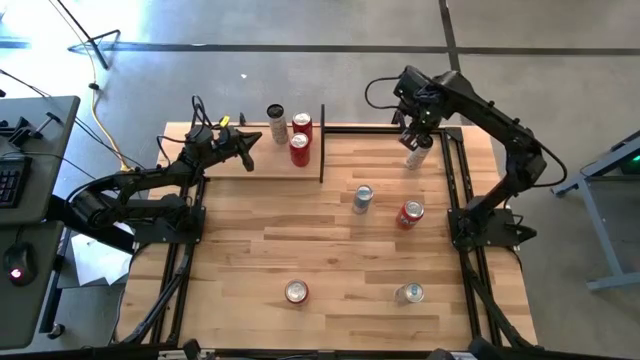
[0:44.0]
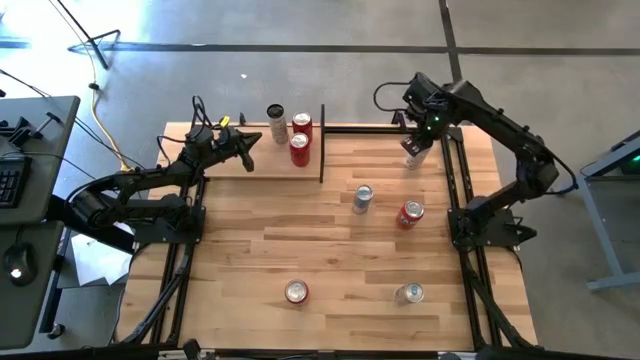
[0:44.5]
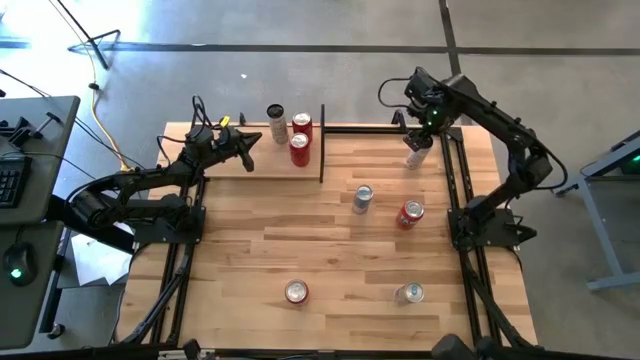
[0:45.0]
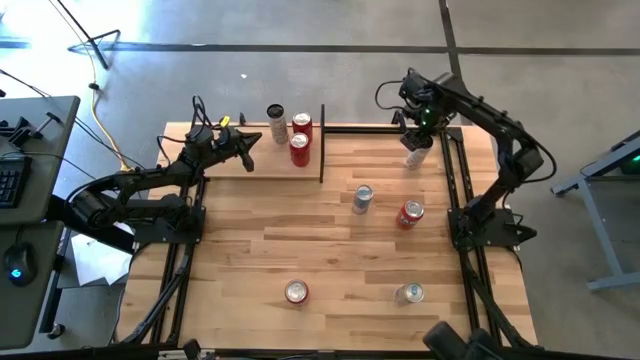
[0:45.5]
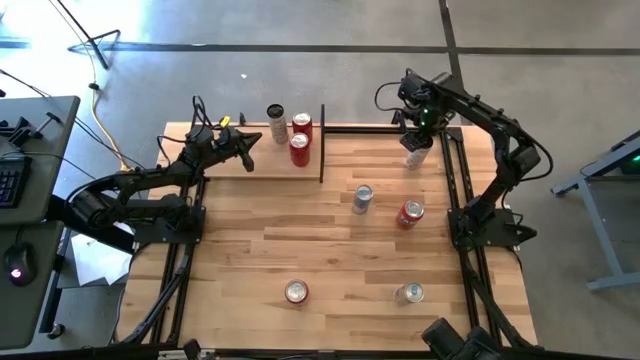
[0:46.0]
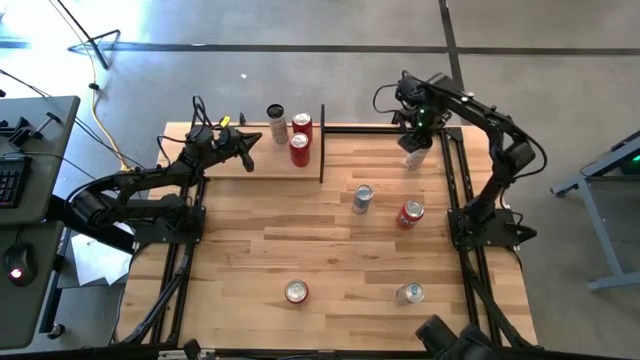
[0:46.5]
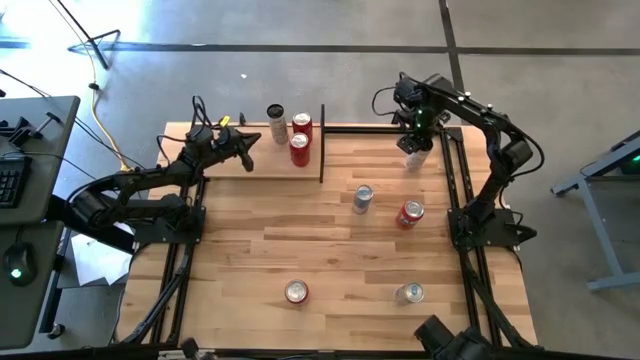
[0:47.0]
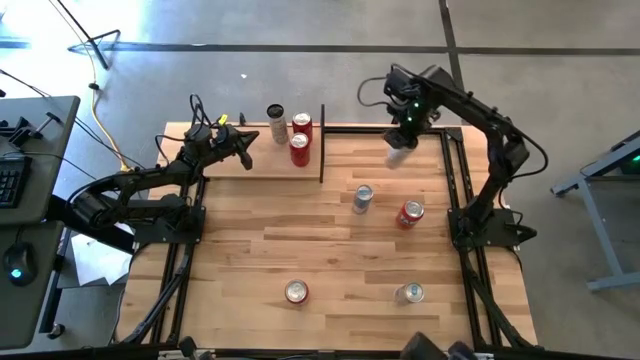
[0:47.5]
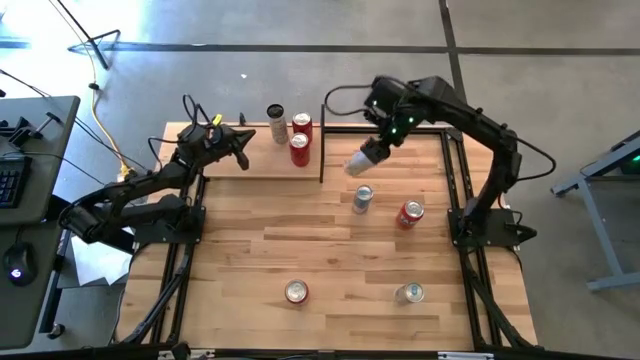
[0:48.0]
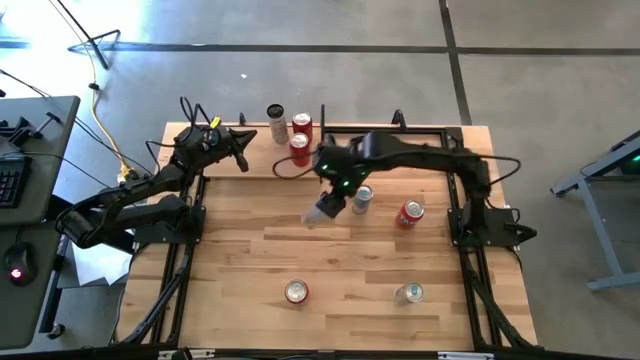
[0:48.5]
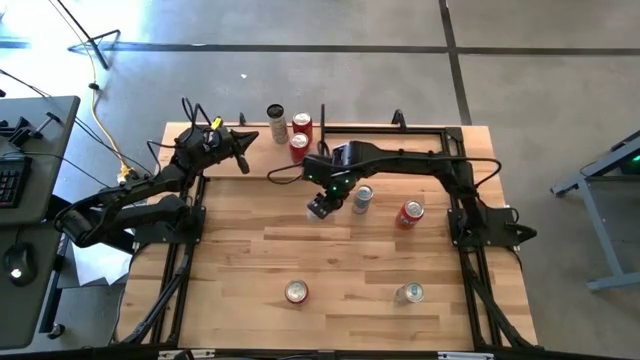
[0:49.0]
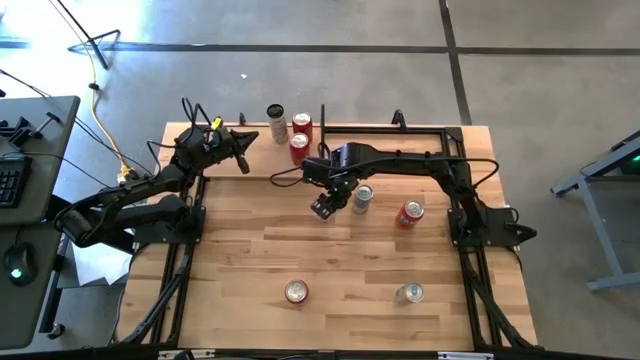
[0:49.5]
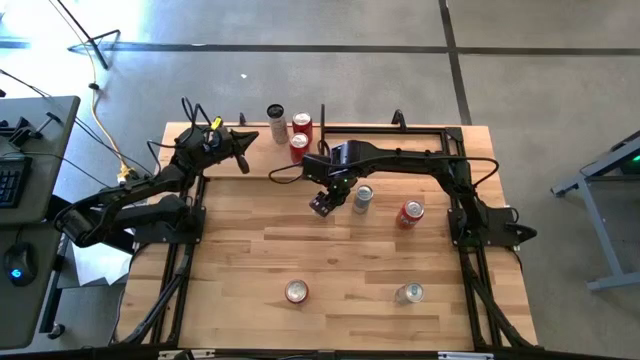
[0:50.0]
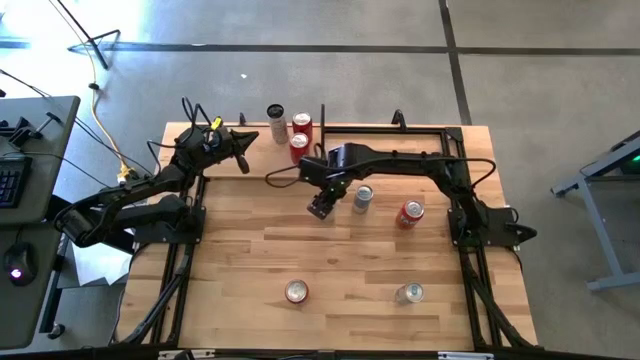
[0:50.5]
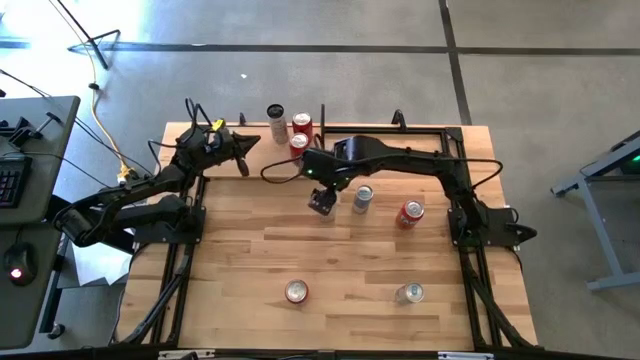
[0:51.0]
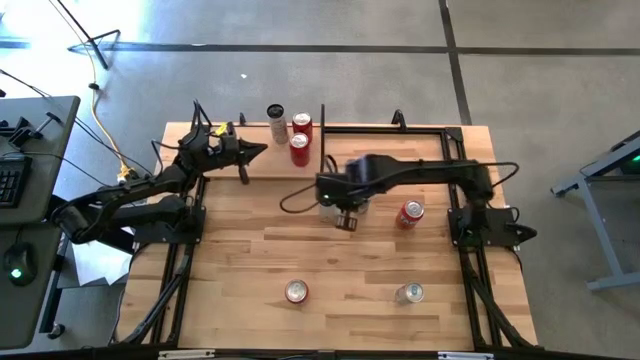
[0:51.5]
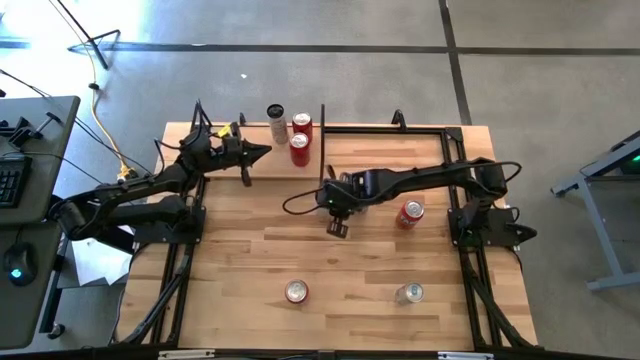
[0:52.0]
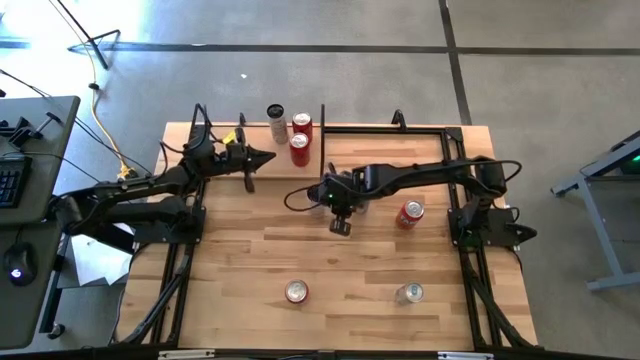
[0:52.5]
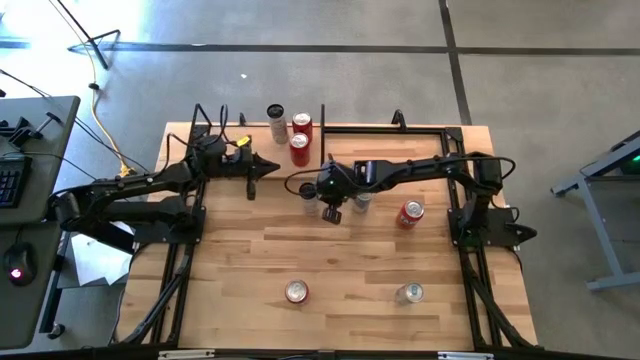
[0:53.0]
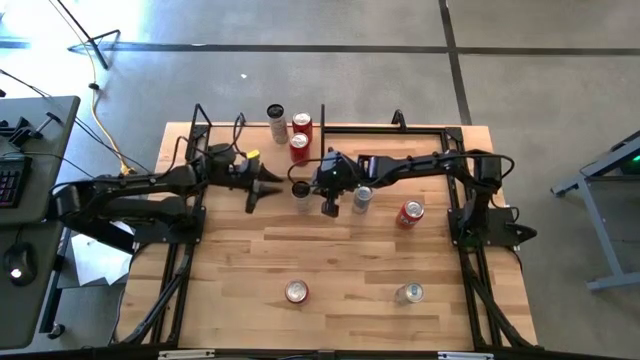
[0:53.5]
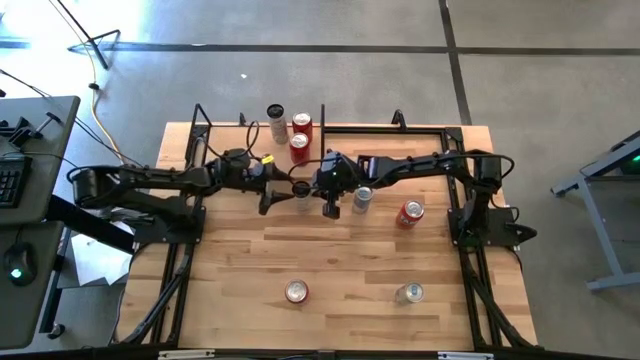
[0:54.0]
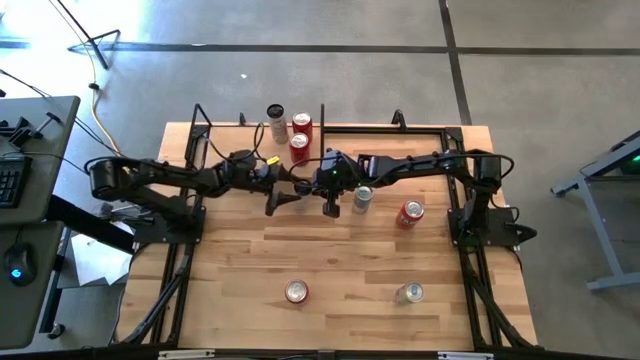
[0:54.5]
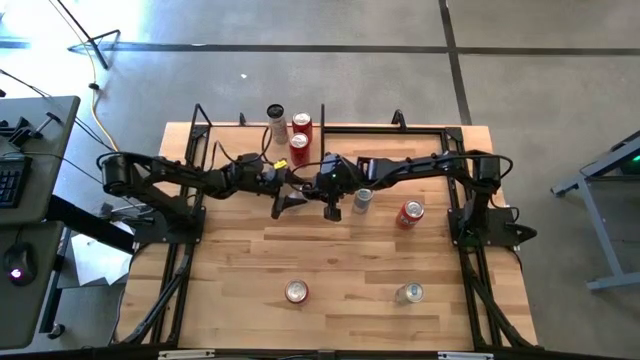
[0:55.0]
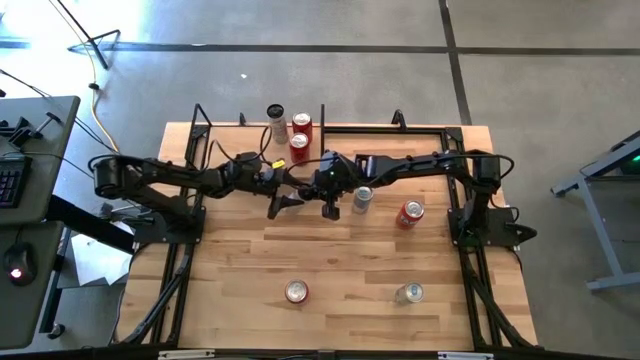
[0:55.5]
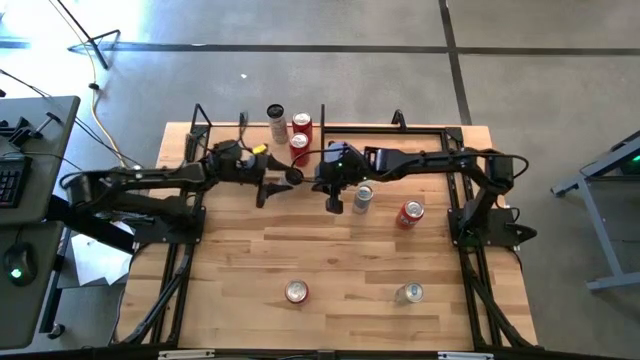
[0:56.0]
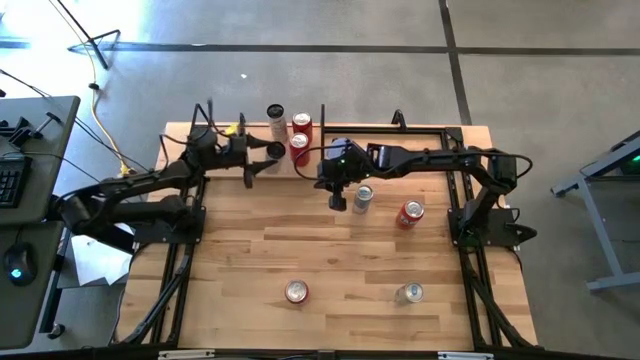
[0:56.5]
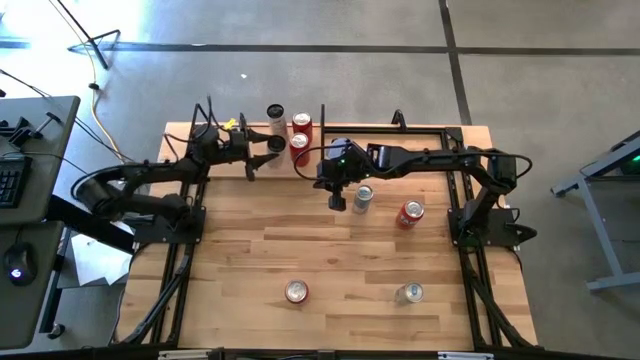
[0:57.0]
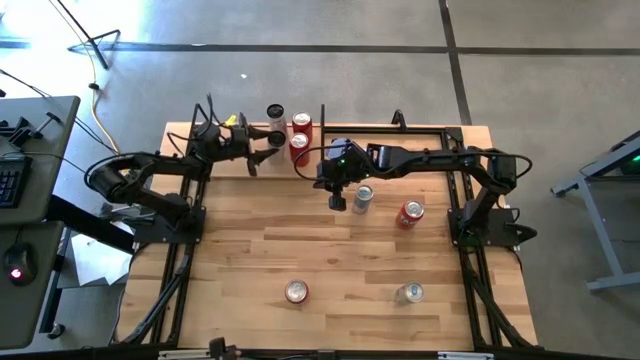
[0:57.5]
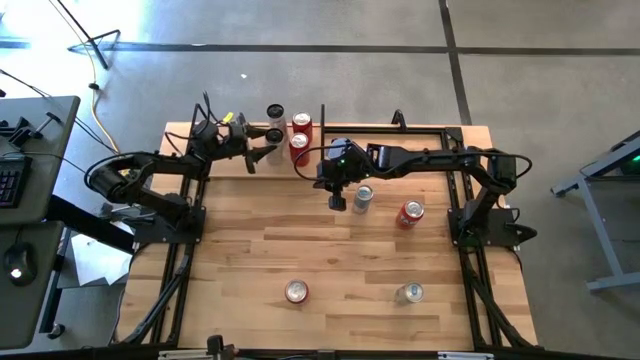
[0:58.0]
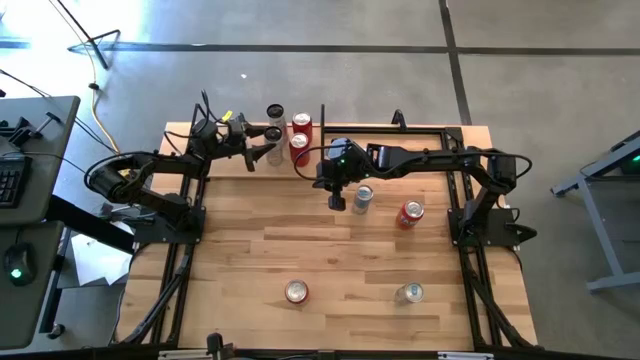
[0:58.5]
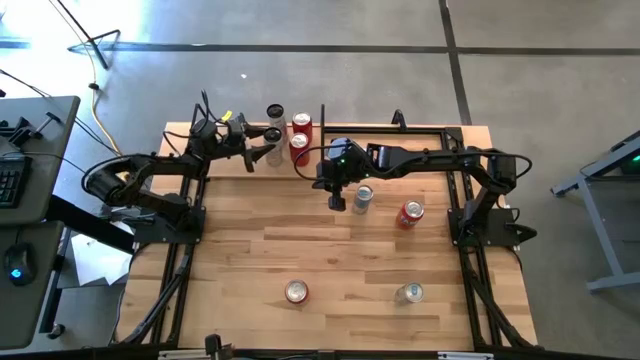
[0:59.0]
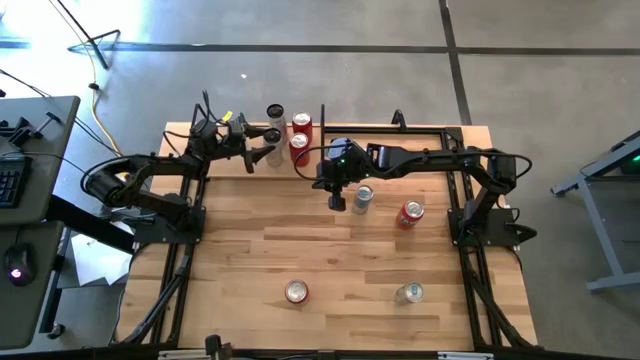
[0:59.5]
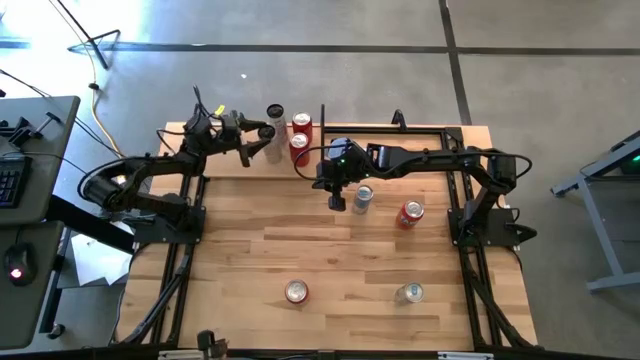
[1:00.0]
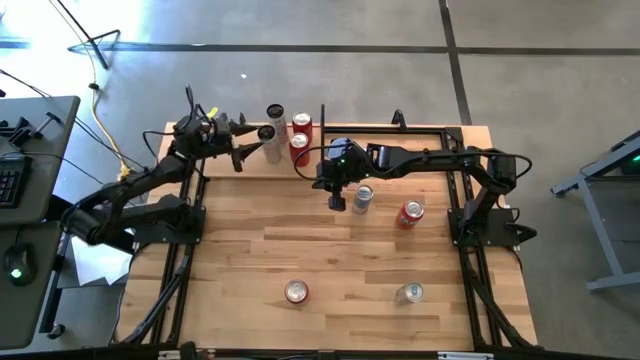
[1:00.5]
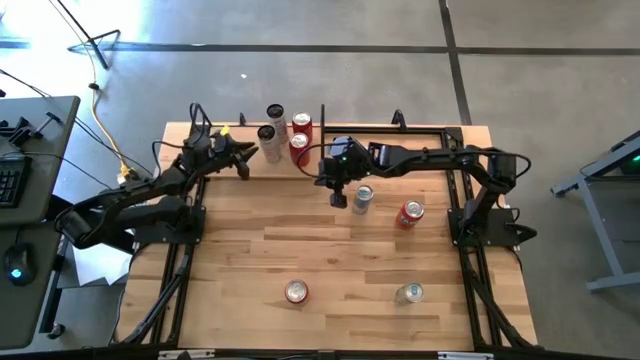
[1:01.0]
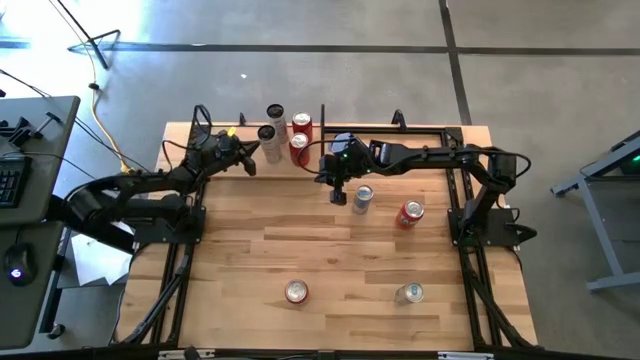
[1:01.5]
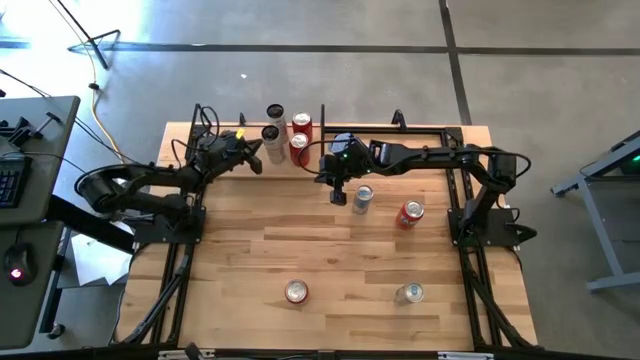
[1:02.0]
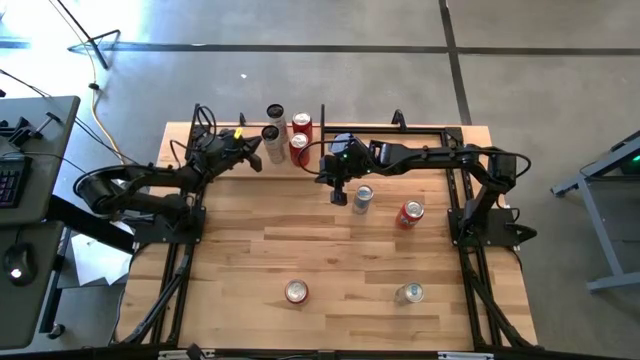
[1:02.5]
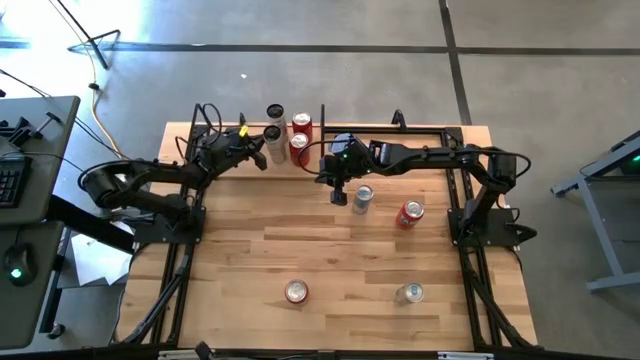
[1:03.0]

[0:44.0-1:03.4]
Task: Place canned beverage on shelf
Put the white yellow soda can aligned with the other white yellow soda can on the shelf

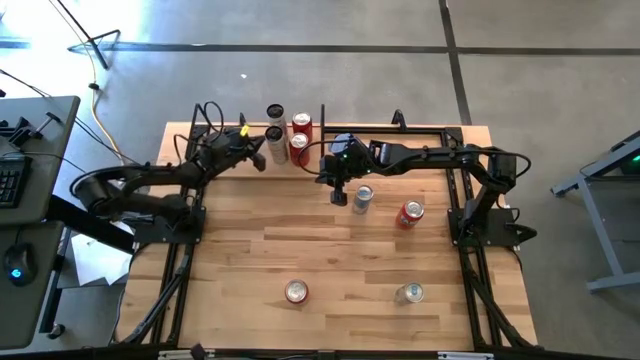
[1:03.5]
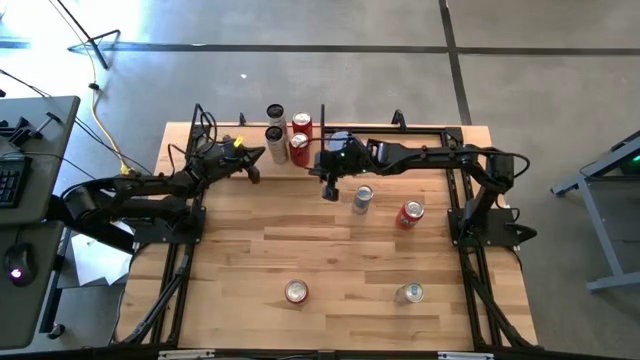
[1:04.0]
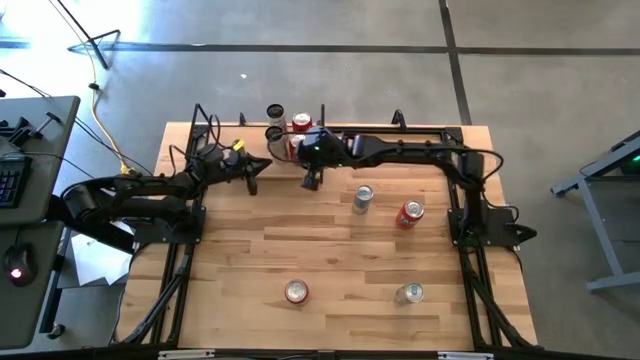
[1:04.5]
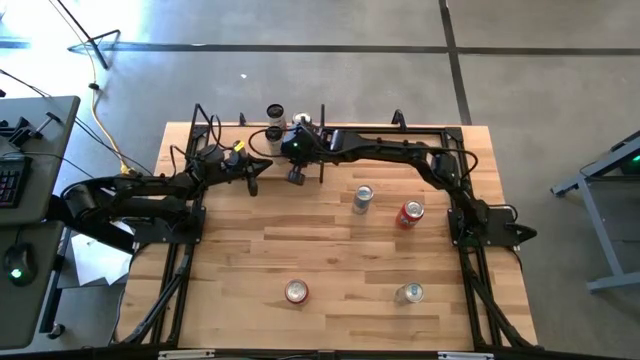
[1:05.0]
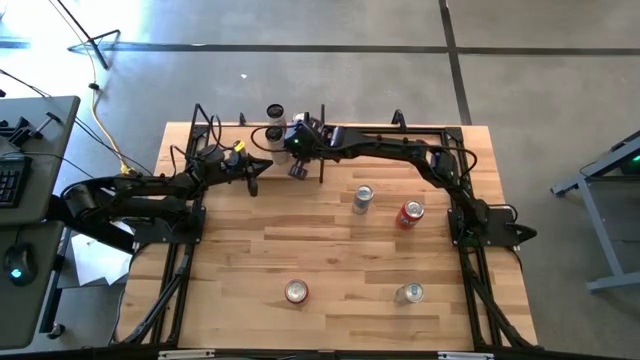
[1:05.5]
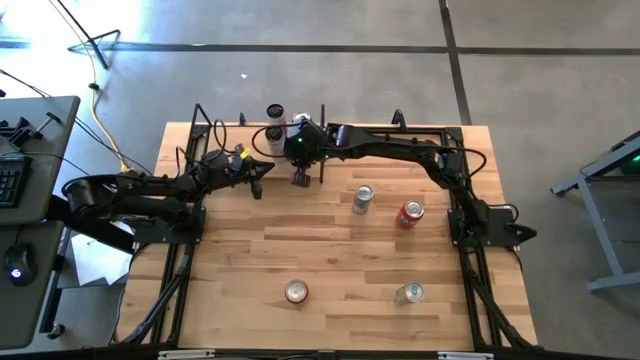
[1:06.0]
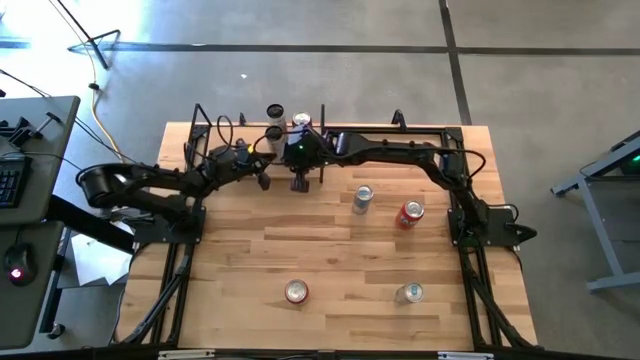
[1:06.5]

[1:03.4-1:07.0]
Adjust the soda cans on the shelf
